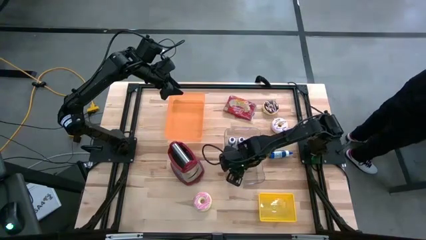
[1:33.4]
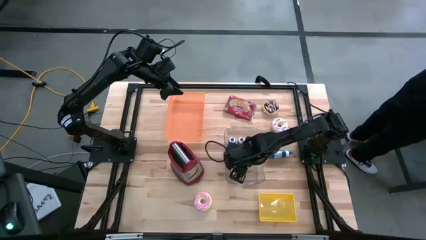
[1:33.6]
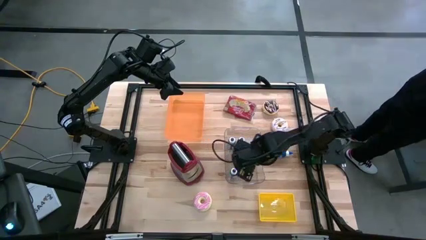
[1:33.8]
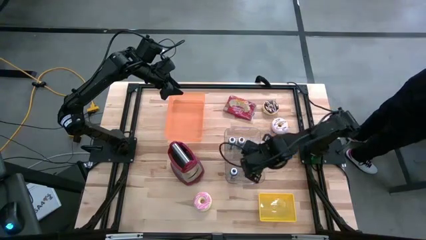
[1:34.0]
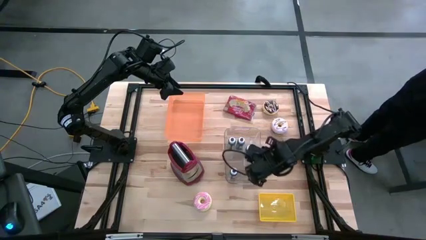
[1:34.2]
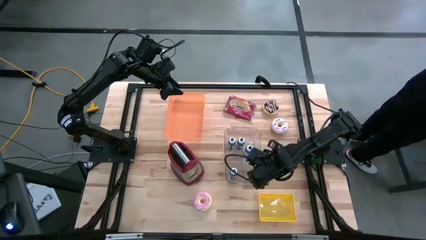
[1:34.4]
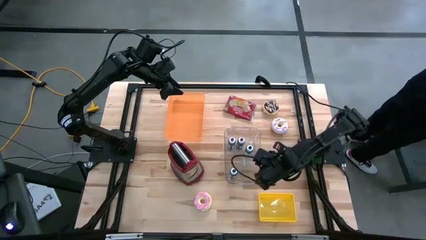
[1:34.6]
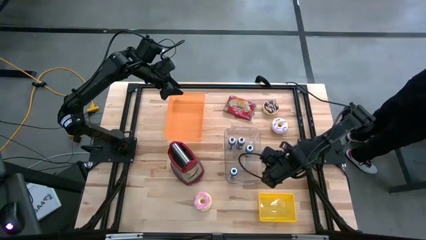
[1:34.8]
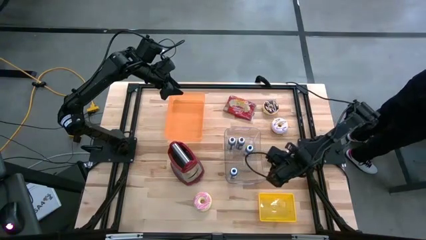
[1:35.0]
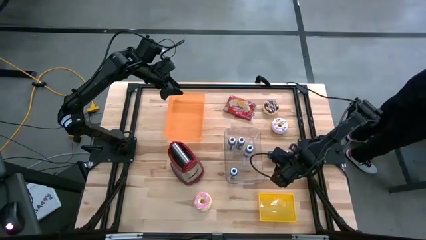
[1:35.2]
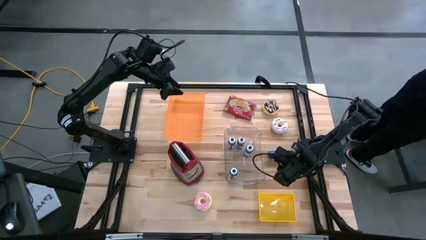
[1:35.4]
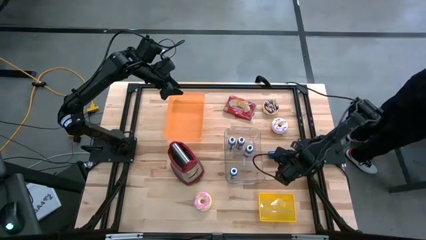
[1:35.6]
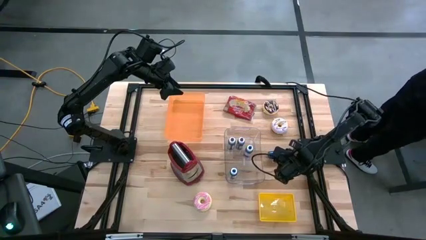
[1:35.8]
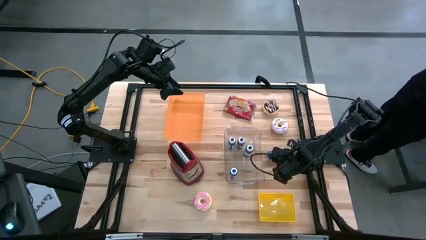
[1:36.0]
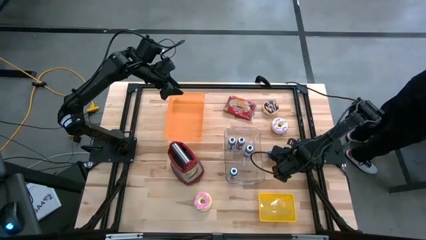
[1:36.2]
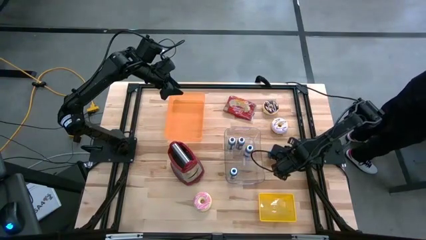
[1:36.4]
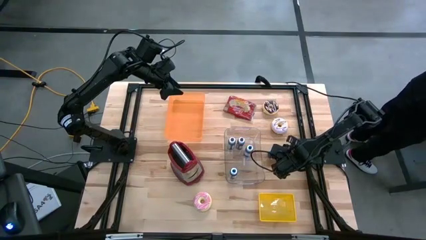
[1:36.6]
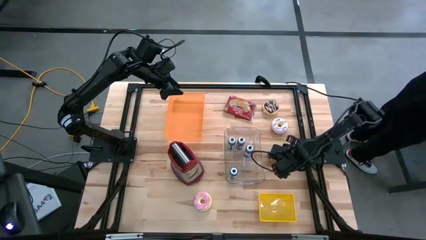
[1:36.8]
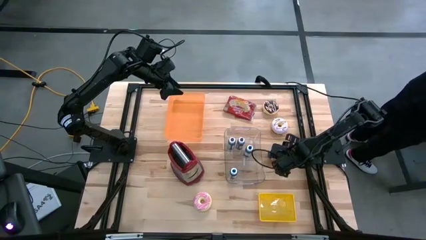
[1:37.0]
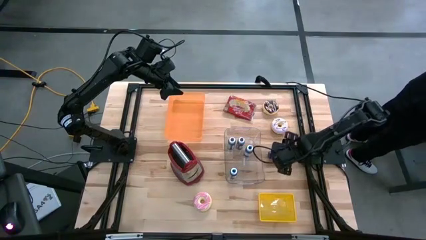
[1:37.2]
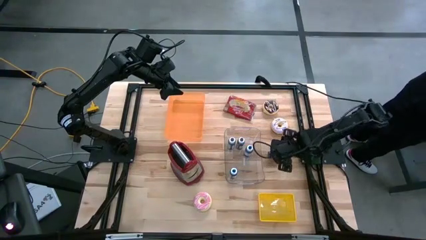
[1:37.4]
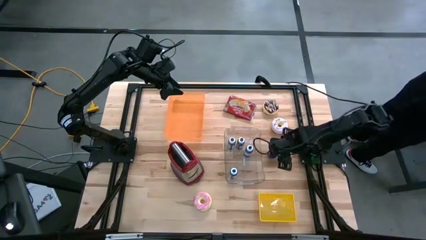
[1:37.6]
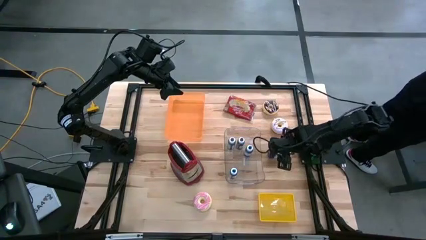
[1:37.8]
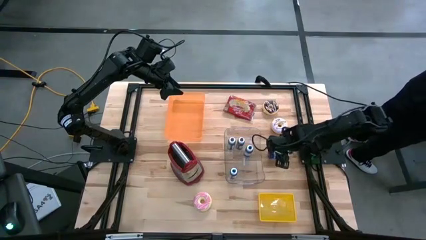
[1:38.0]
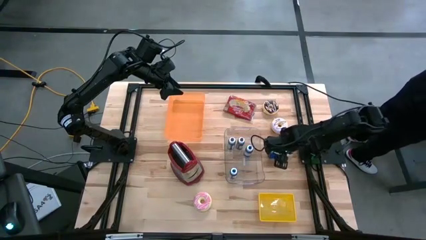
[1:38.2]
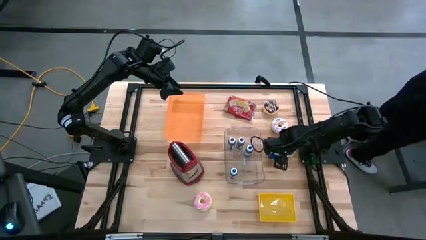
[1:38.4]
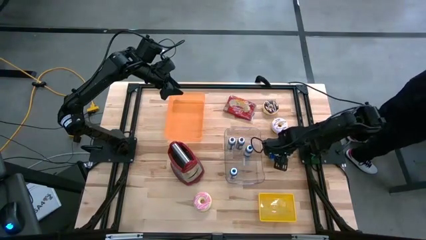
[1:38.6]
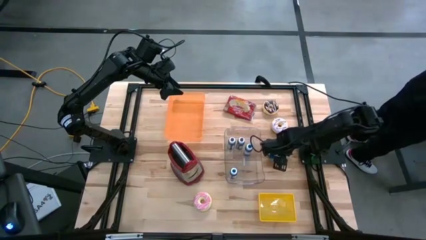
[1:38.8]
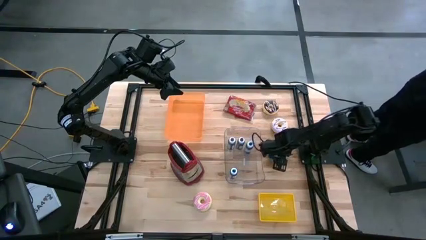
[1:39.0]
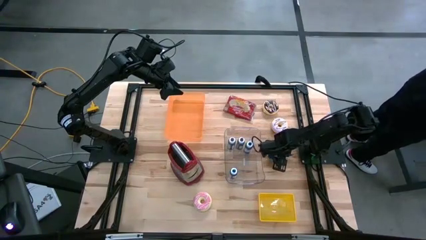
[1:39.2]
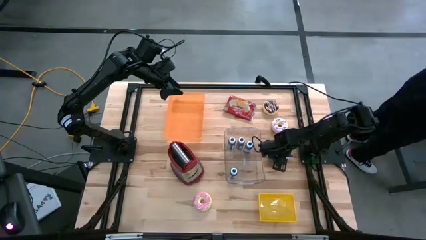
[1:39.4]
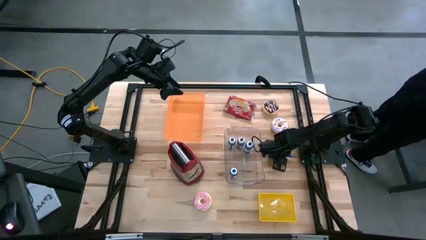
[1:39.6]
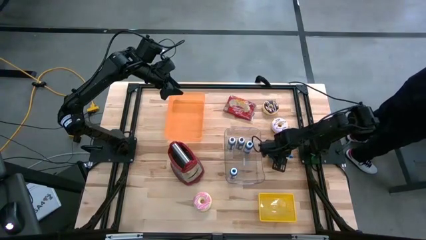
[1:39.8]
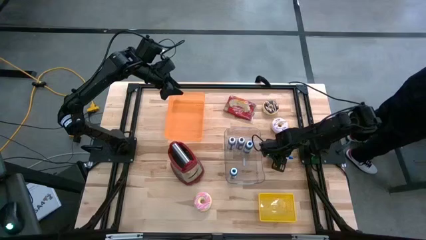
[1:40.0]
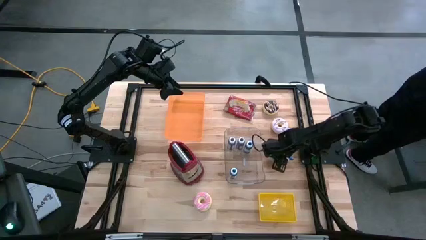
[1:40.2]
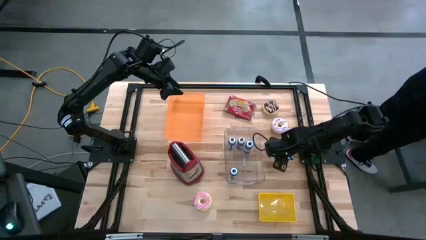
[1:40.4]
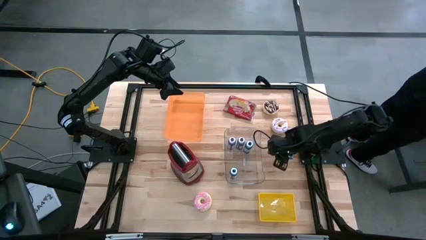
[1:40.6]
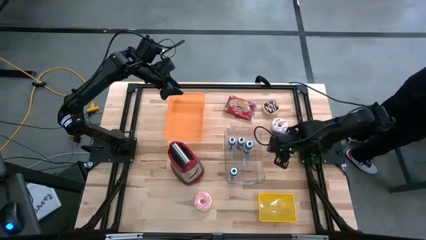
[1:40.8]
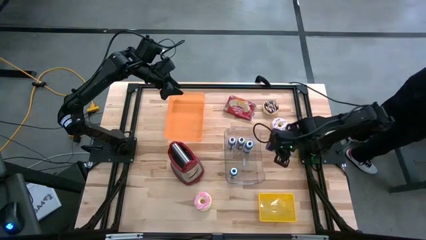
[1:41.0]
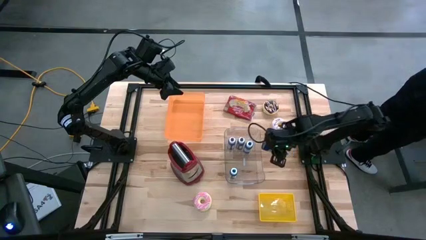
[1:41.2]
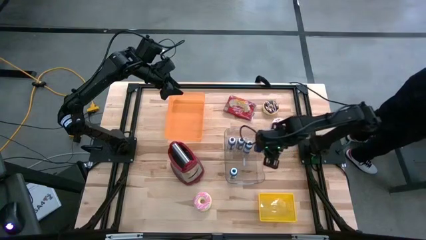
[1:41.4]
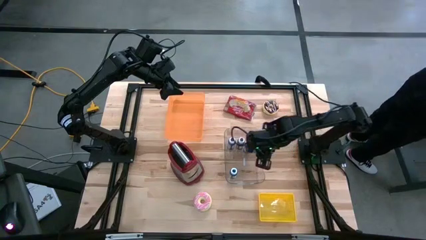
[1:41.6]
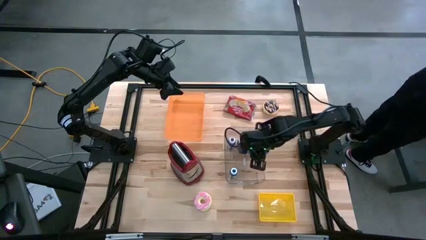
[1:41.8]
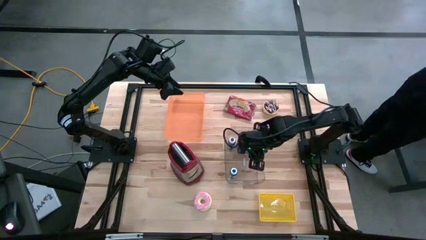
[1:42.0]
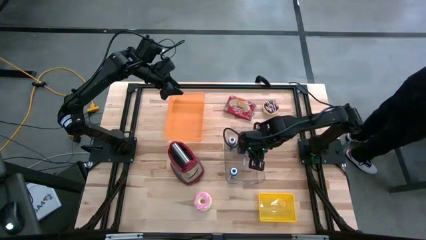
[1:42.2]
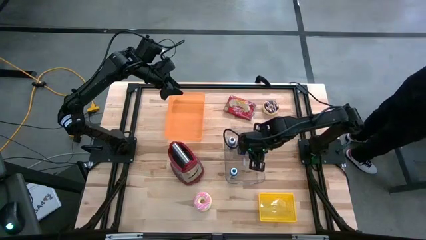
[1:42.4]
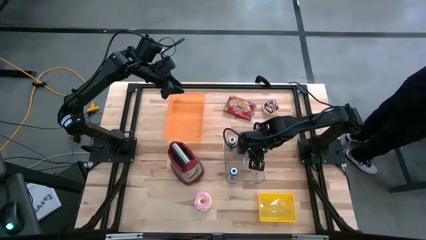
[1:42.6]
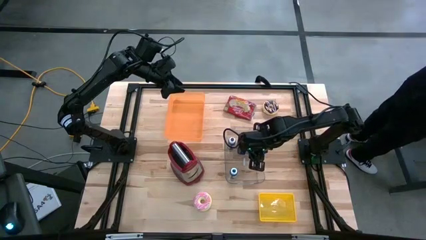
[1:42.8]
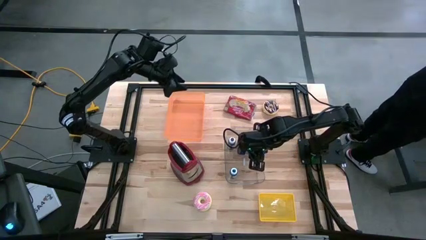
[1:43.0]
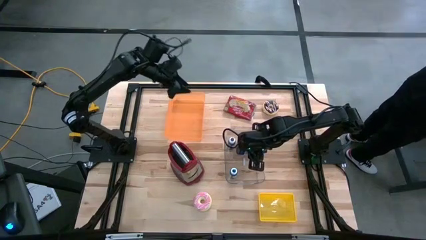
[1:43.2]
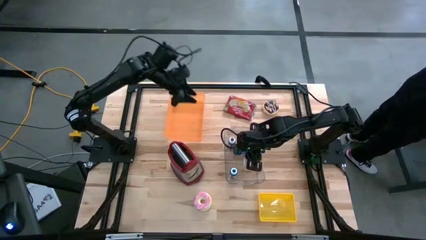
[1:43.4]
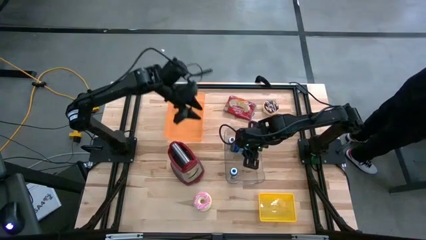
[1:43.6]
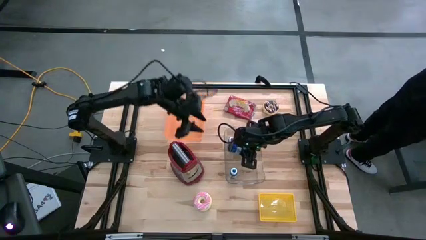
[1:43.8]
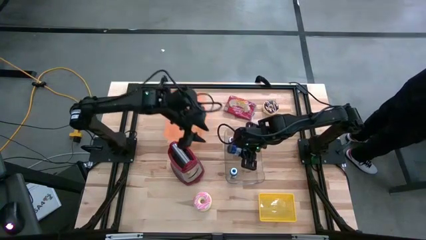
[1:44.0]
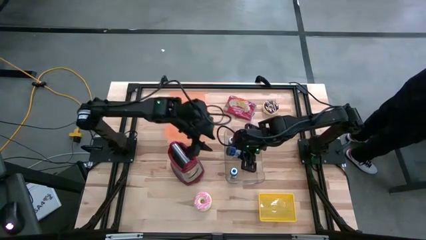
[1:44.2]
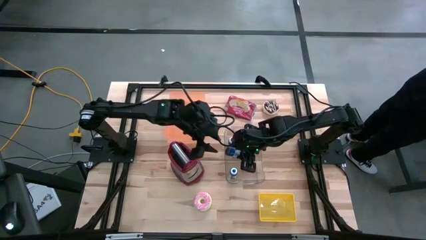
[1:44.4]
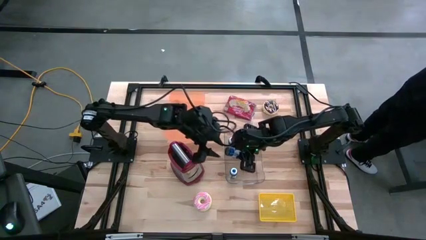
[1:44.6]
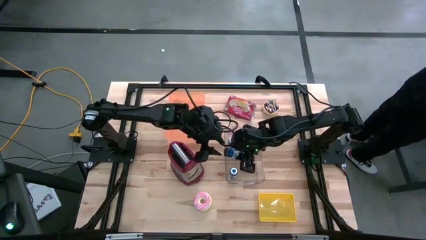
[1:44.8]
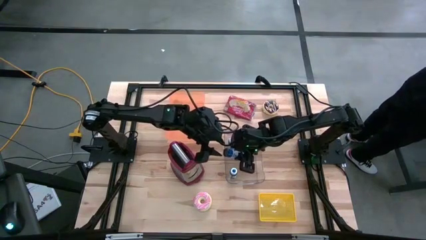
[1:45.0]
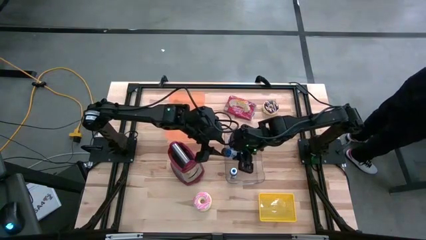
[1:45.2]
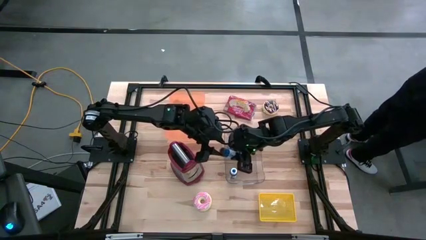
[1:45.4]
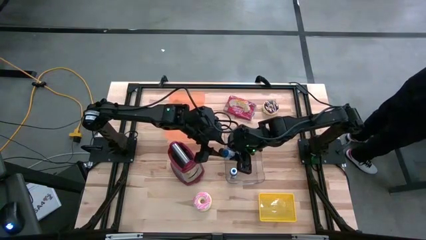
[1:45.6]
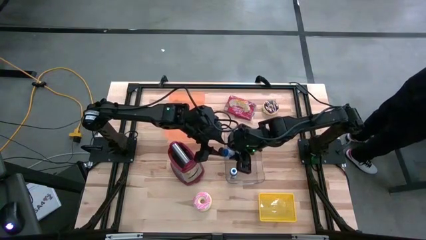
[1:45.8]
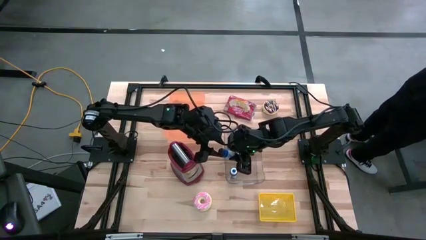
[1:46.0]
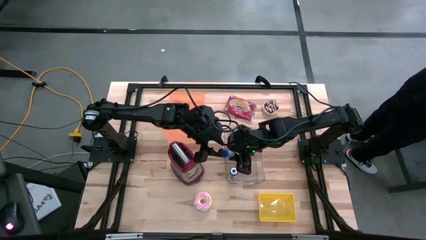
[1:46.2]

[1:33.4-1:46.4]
Task: Pick & Place Food Item
Put the blue food coloring bottle into the transparent bin
